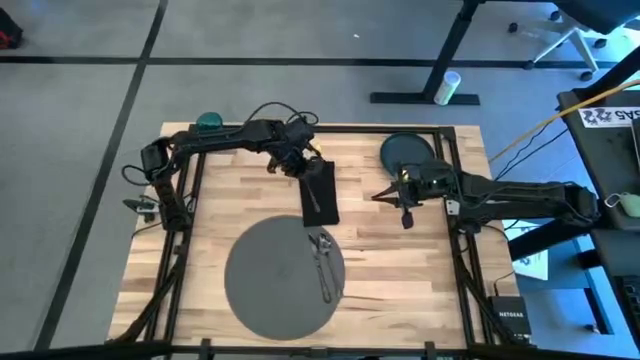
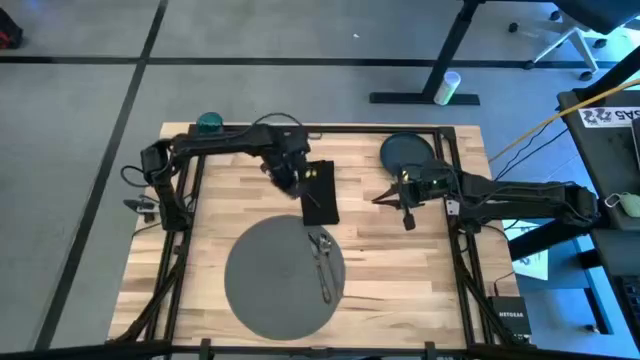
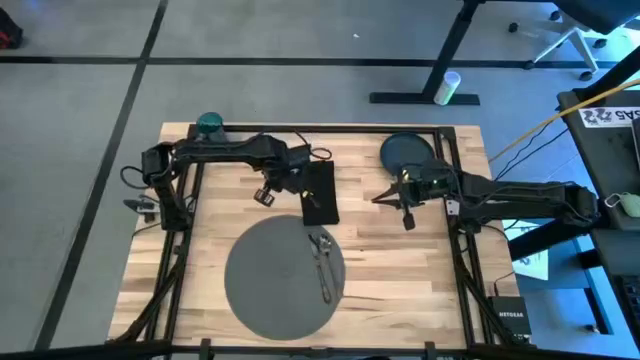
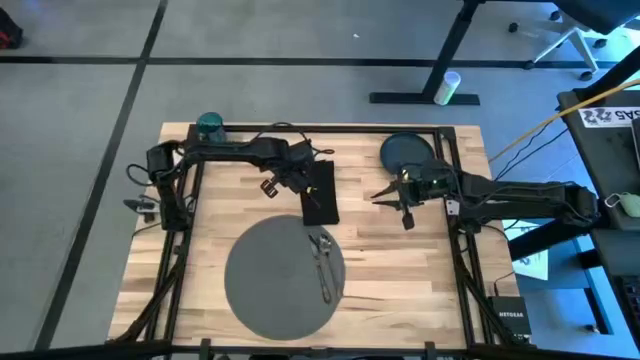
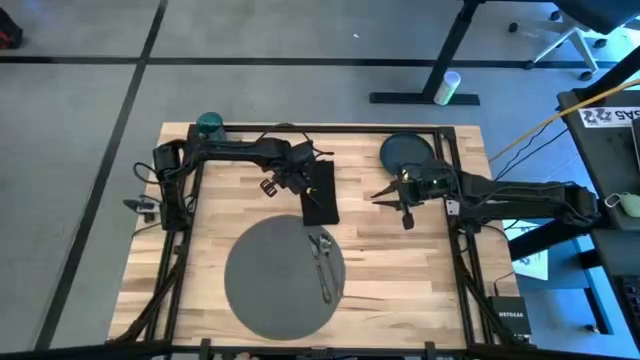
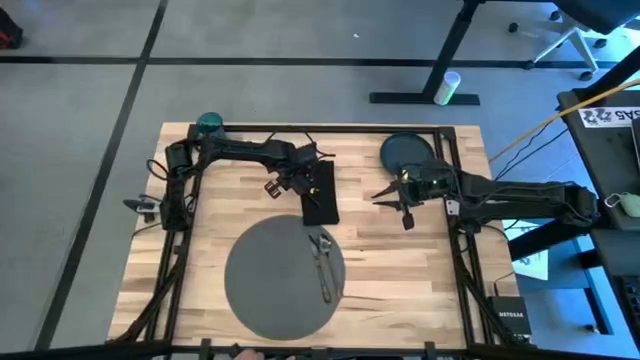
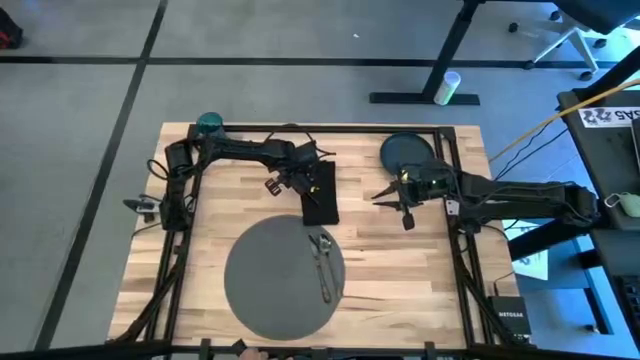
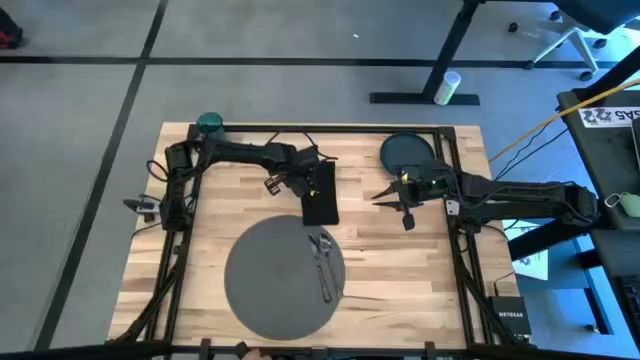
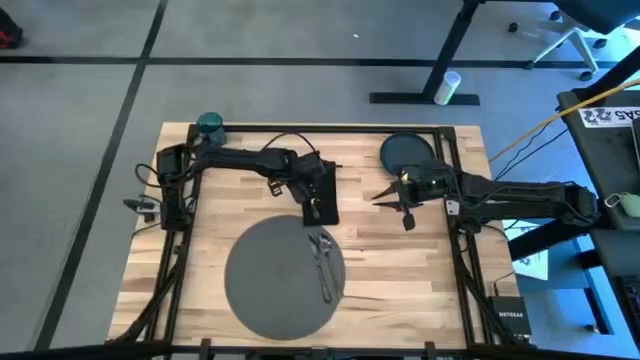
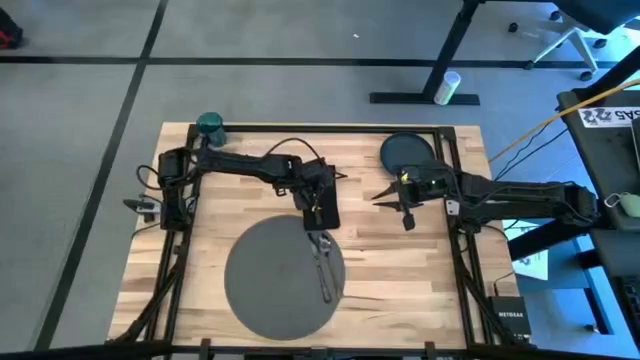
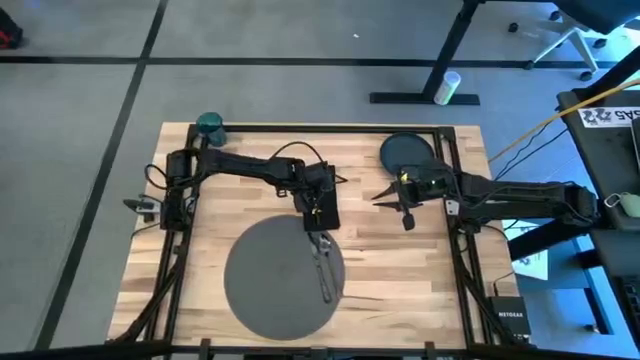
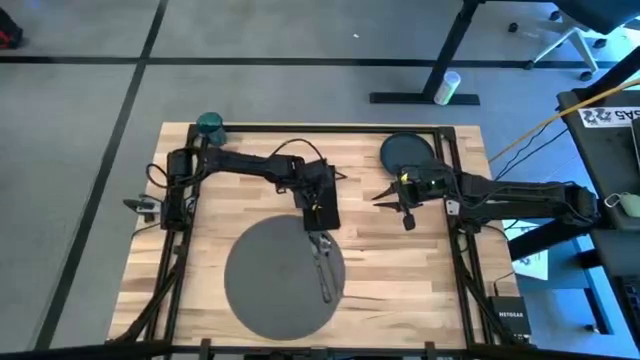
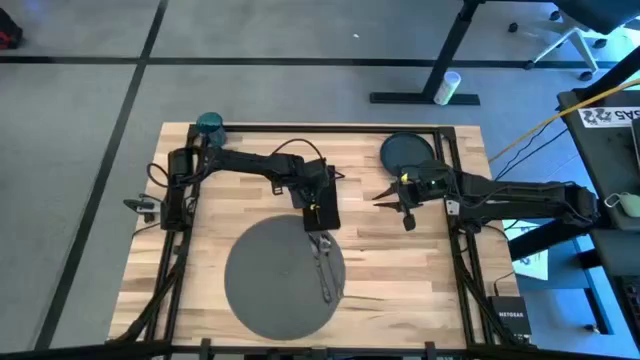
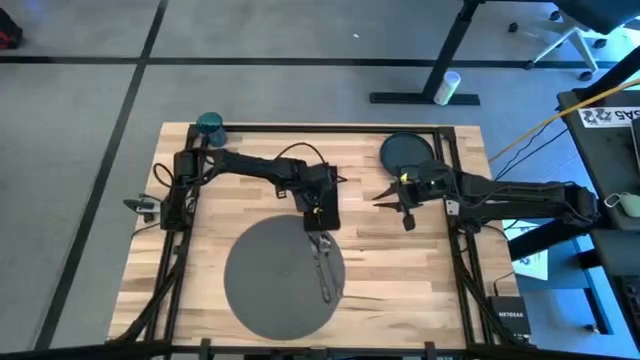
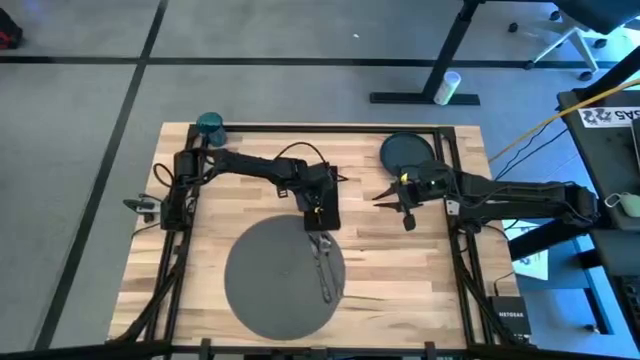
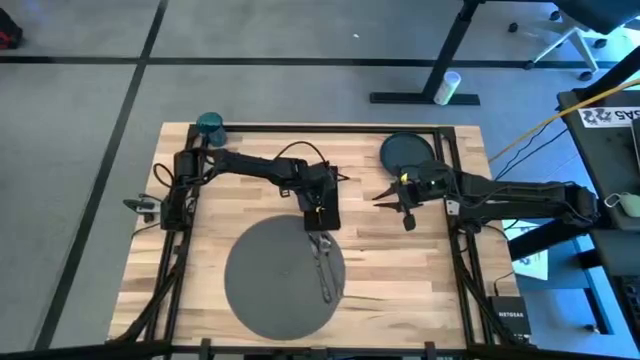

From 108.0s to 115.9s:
Task: Set table place
Put the black fork on the black table napkin

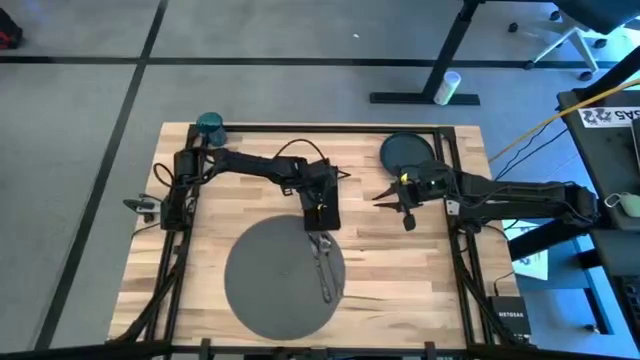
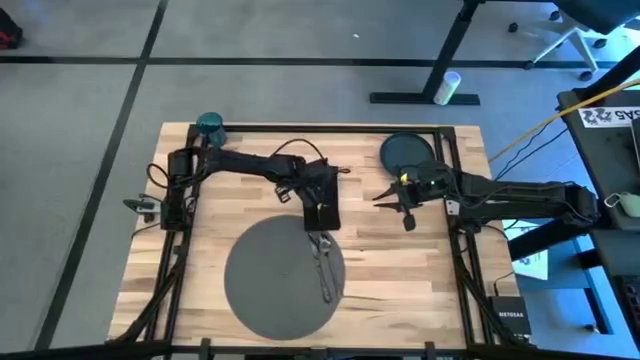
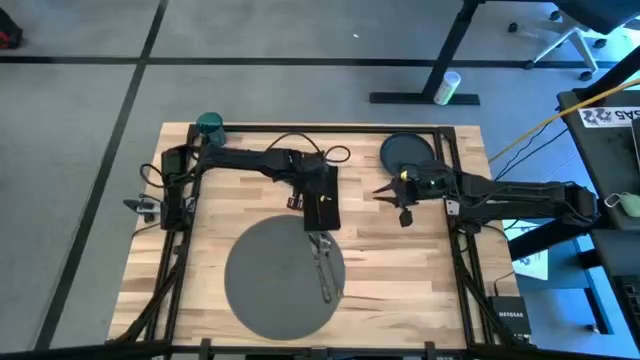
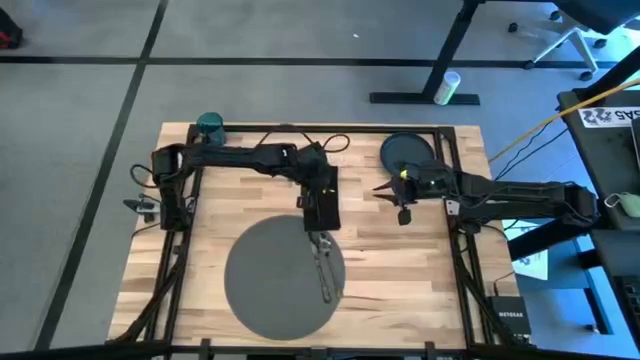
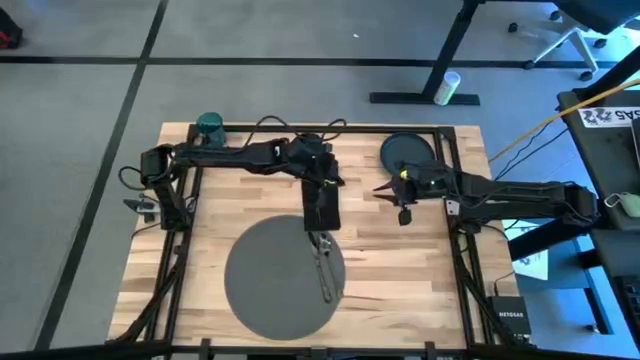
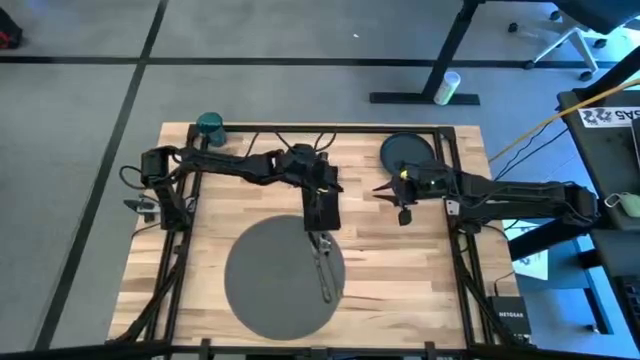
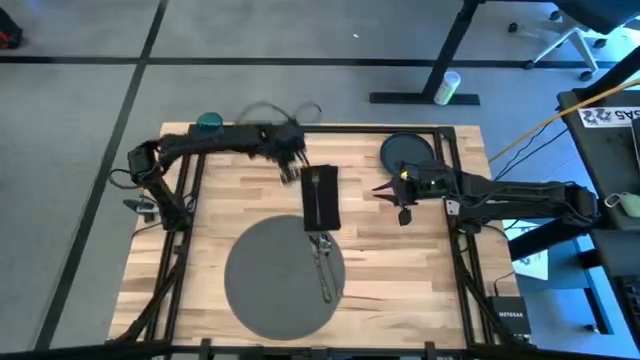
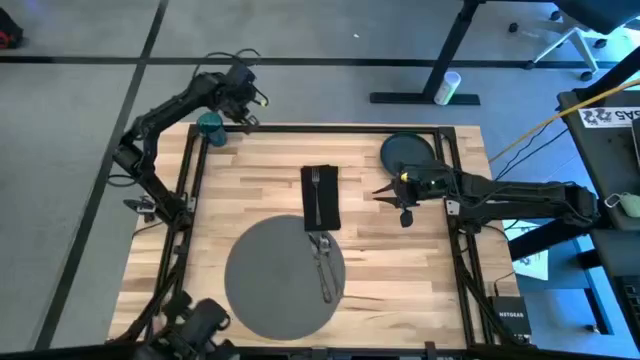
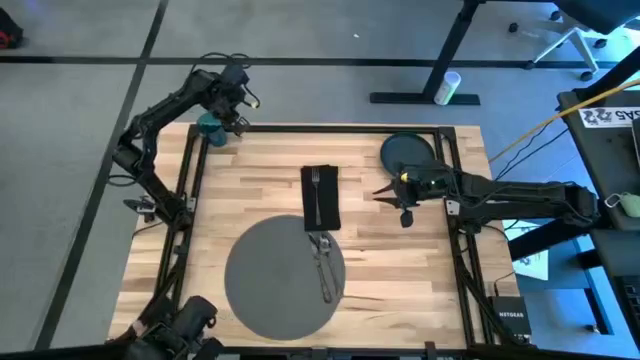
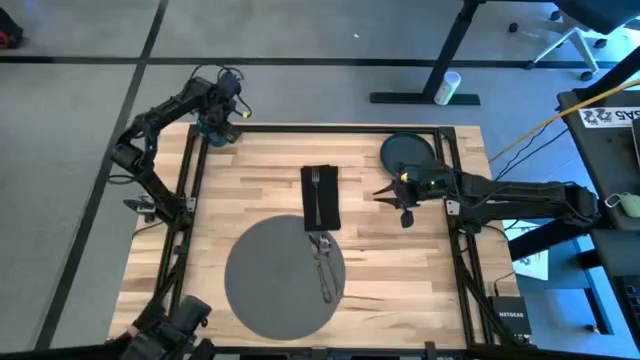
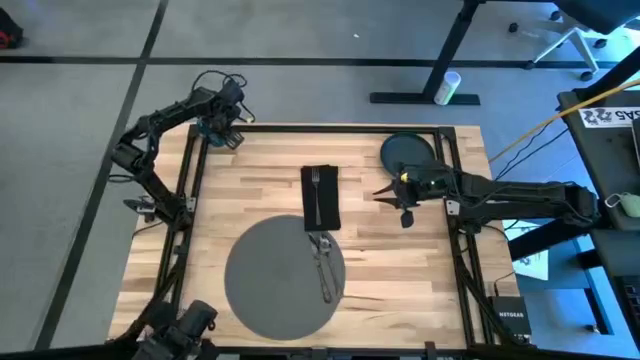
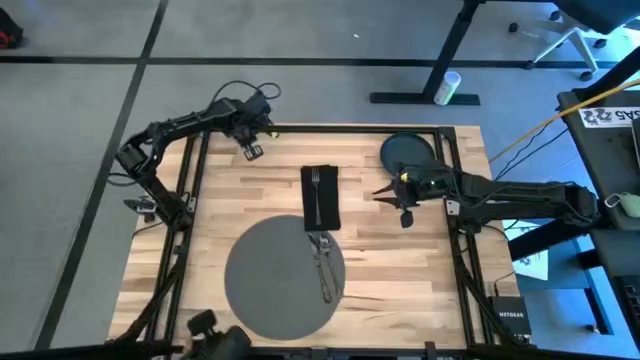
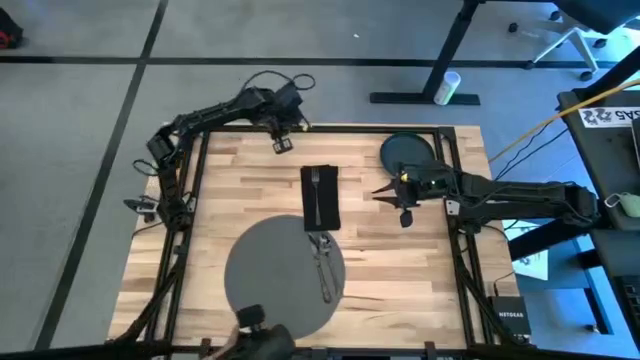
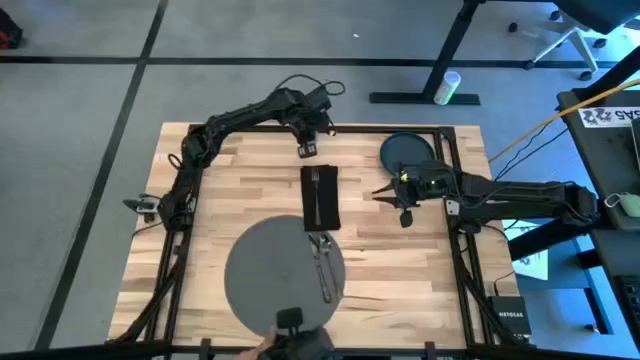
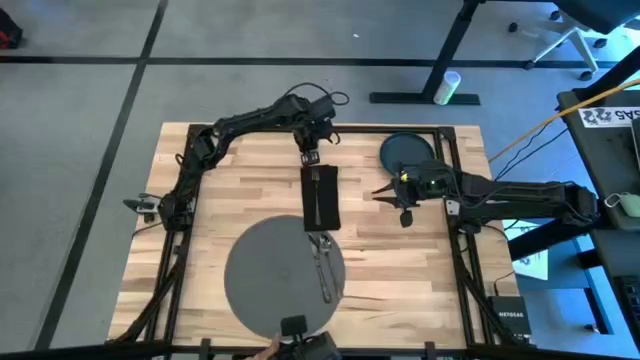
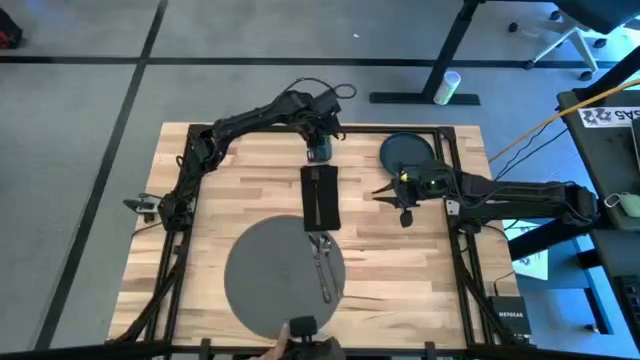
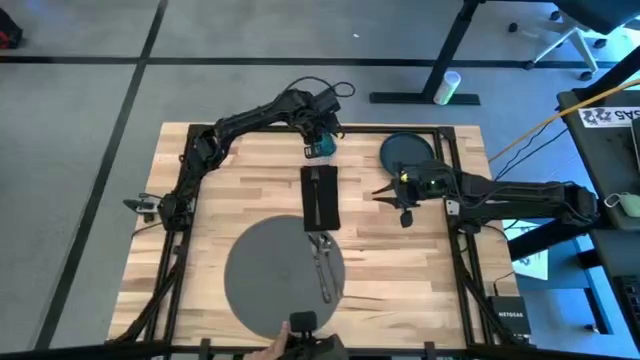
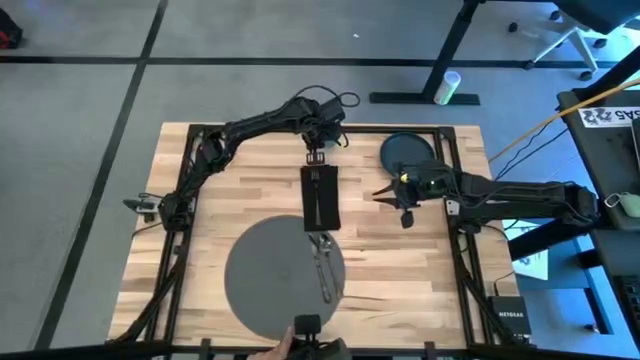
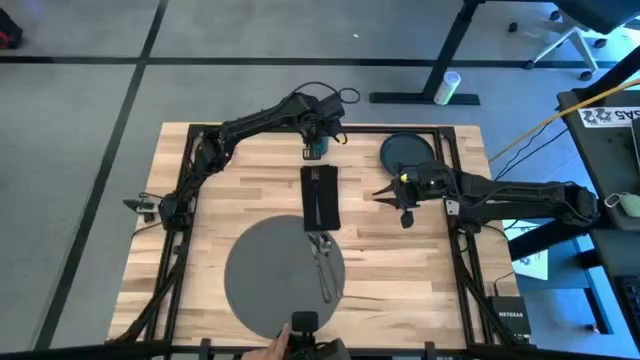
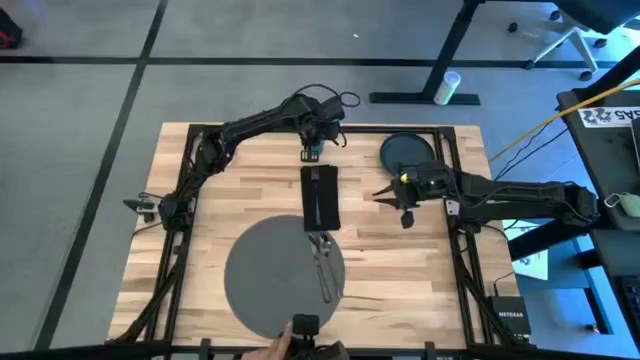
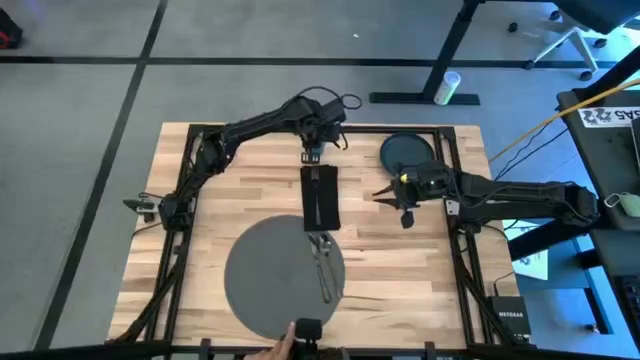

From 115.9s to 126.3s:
Move the blue cup to the top of the table

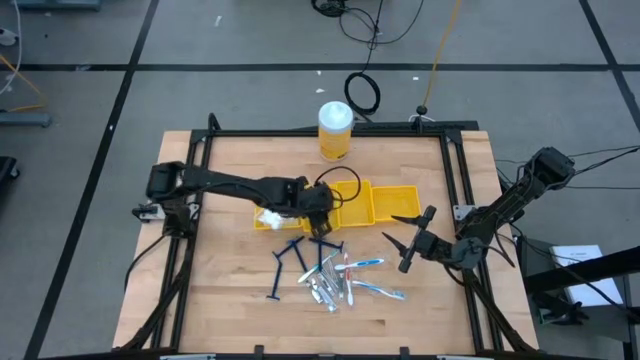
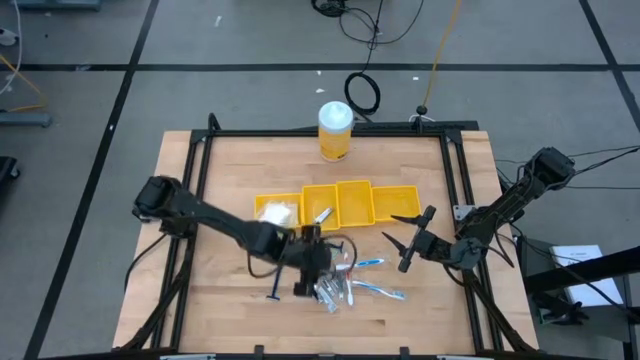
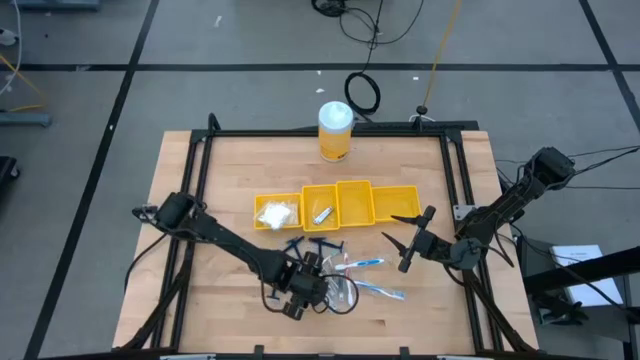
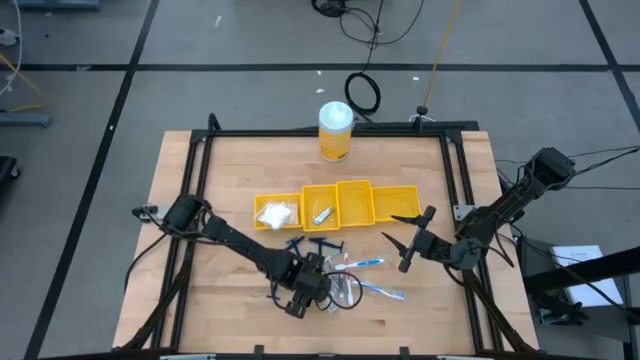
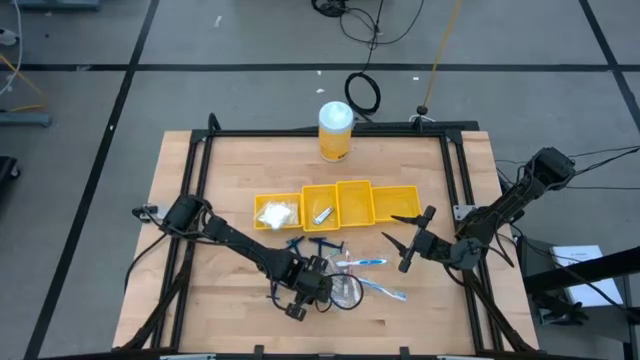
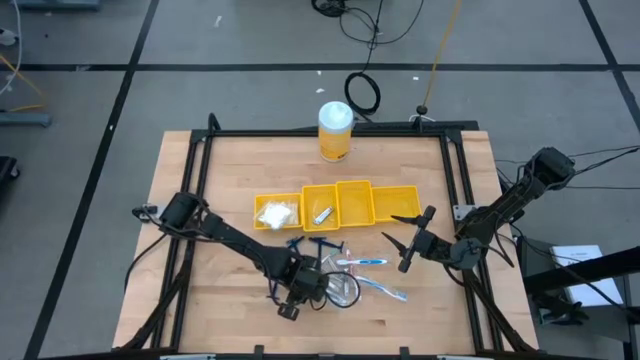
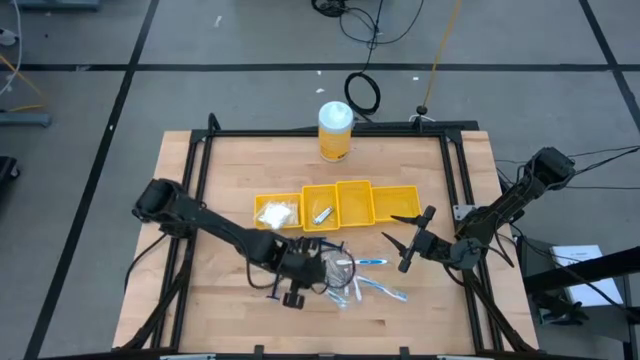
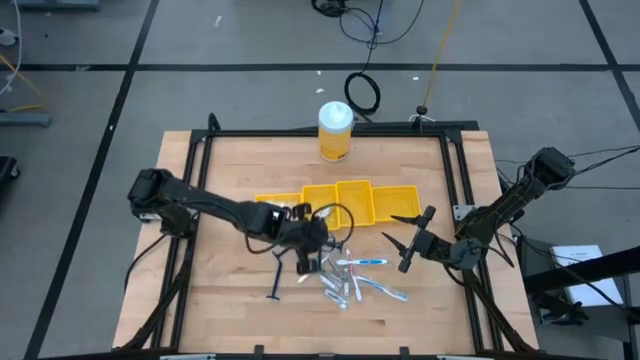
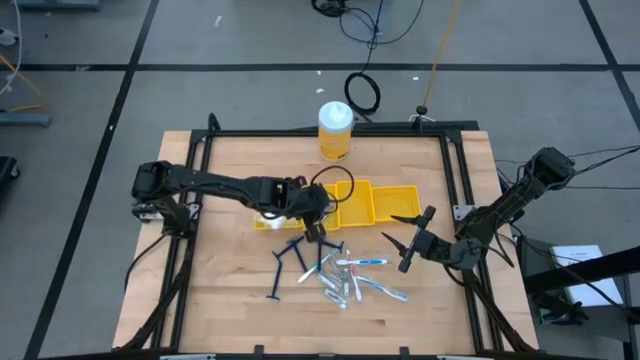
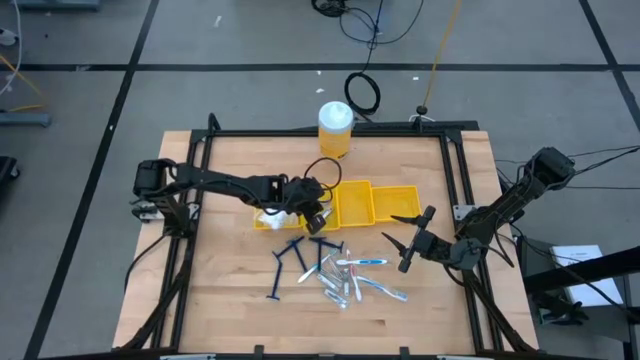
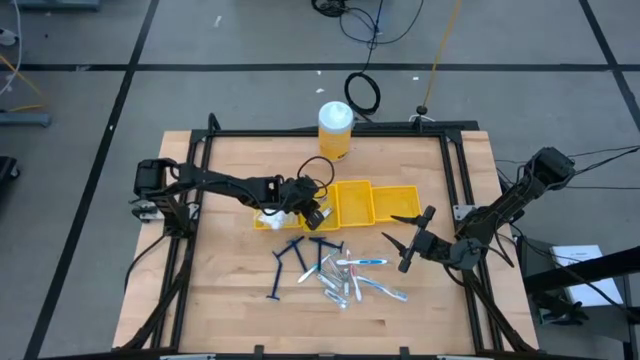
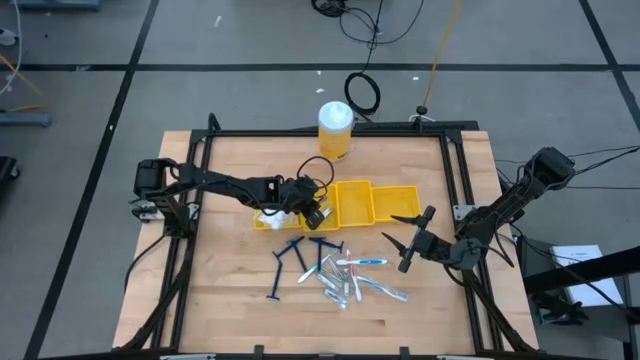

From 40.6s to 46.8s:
Task: Pick & Place Travel size toiletries
Put the silver nail cutter into the middle left yellow bin
